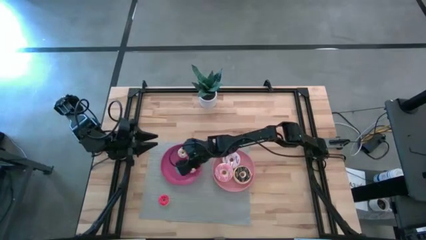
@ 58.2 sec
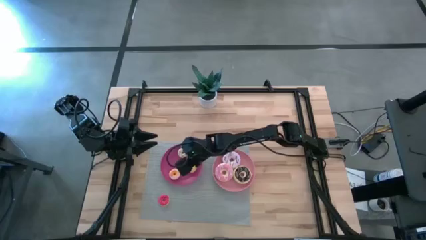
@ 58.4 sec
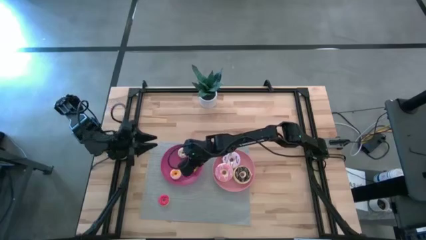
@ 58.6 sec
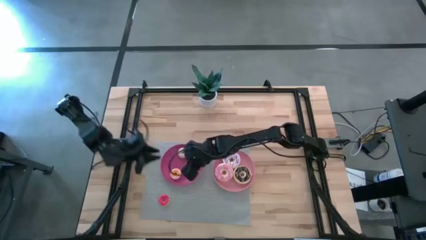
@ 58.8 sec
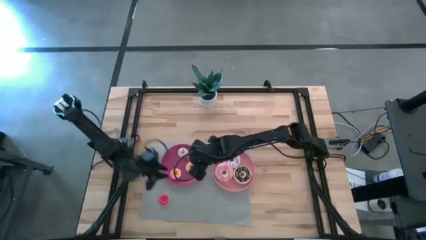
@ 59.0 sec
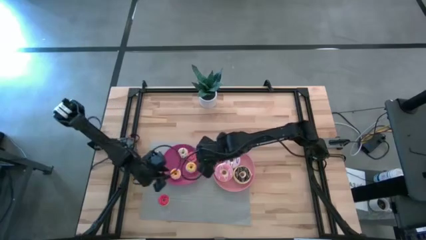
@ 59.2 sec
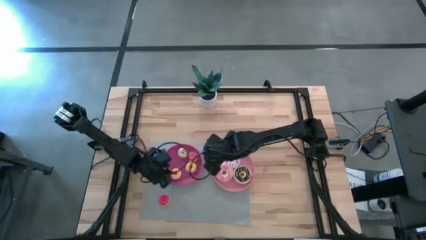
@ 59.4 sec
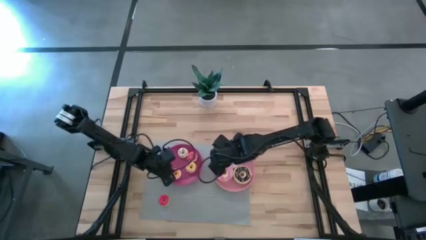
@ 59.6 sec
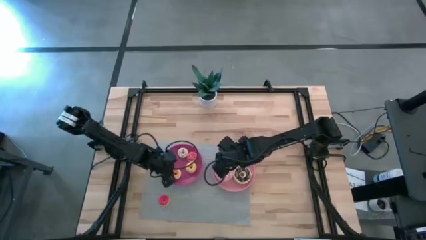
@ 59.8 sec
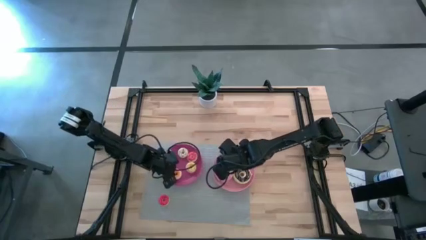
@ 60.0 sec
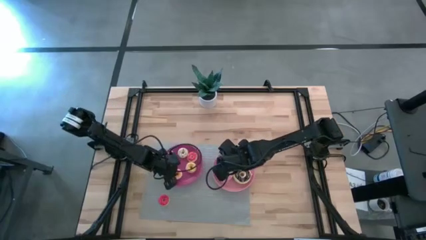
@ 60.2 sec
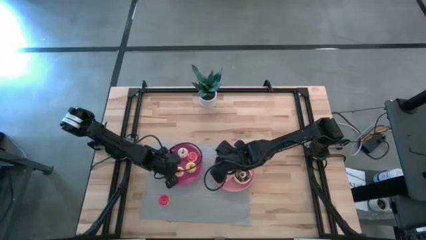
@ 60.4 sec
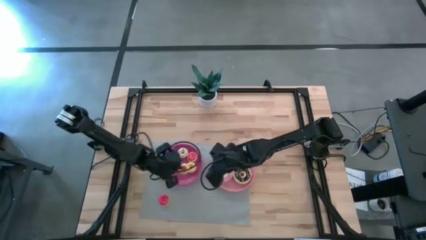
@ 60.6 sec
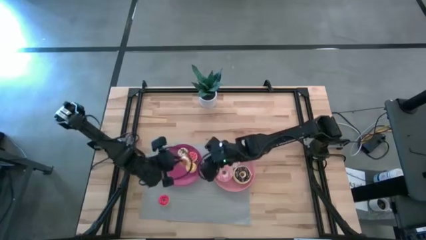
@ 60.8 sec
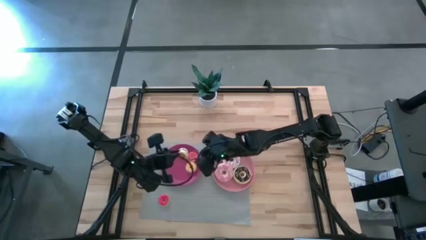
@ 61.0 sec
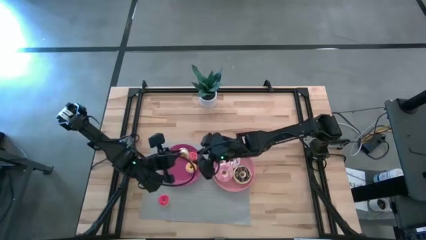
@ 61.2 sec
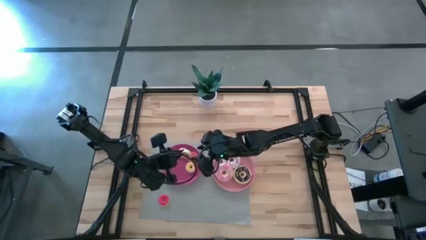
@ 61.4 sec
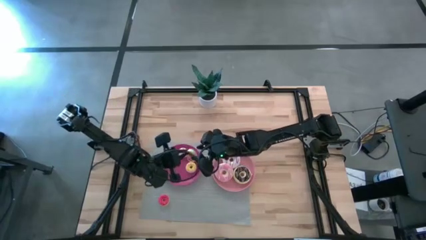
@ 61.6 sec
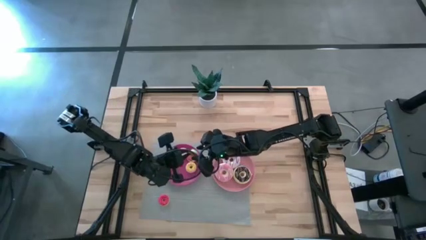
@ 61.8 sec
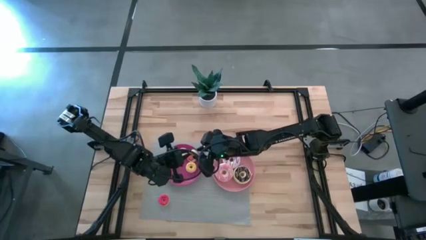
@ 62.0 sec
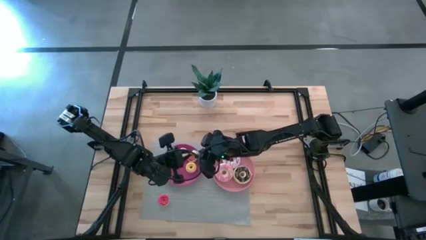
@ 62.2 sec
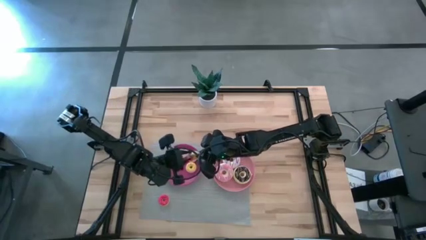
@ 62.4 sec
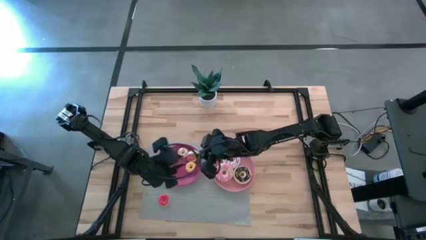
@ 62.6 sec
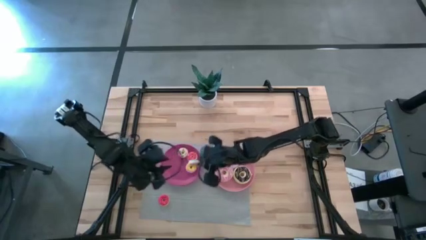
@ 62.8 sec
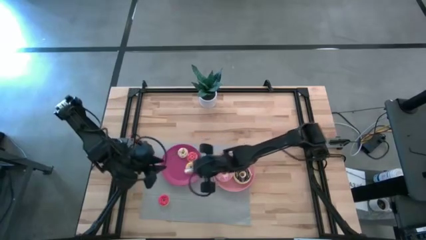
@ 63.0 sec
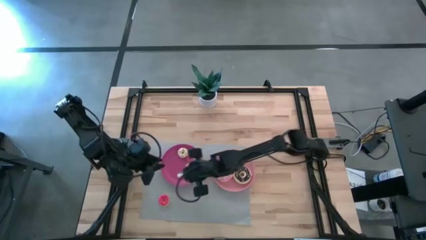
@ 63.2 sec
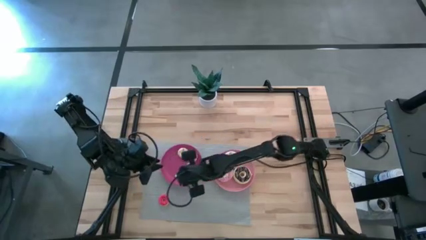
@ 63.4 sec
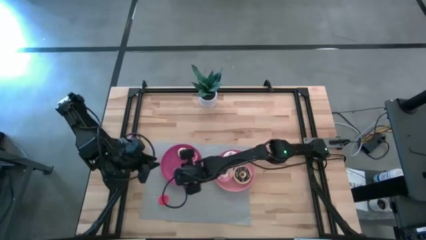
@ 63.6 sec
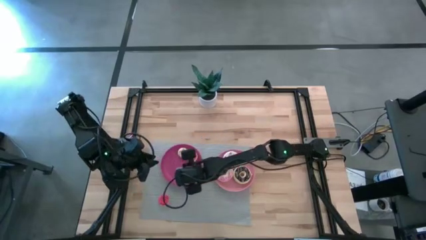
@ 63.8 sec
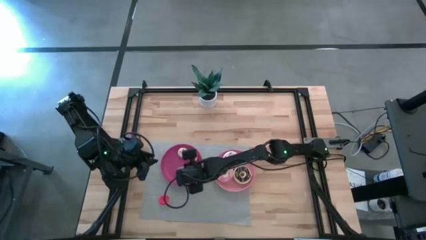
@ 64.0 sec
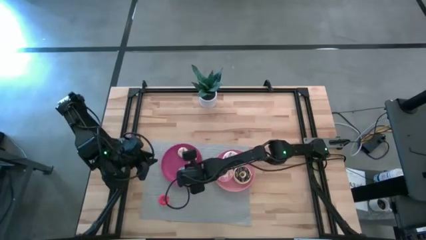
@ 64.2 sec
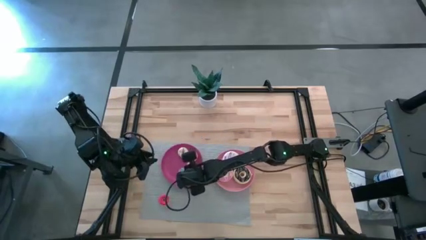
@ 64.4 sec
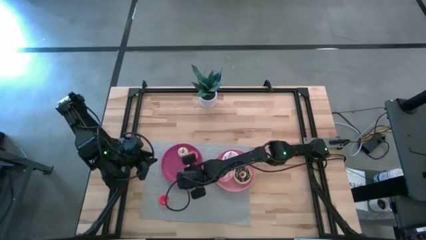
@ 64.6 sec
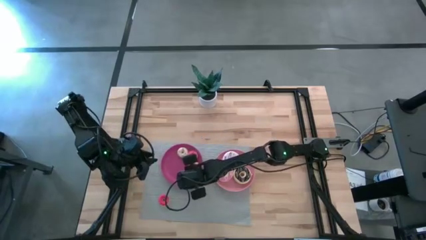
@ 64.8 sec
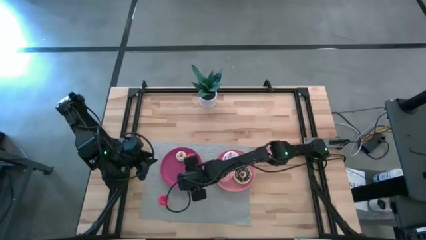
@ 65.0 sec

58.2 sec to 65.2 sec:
Task: Pick & Place donuts
Put the small blue donut on the dark pink plate

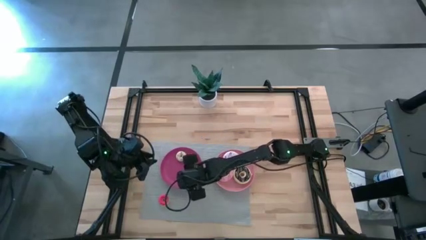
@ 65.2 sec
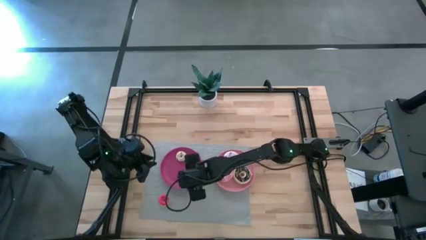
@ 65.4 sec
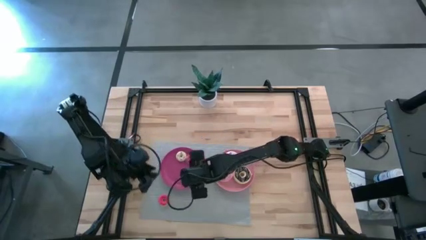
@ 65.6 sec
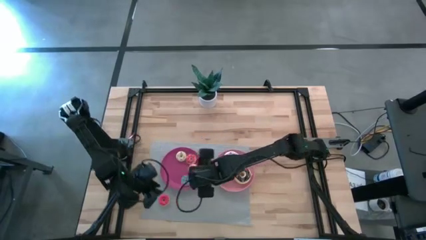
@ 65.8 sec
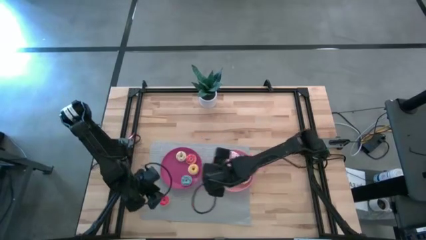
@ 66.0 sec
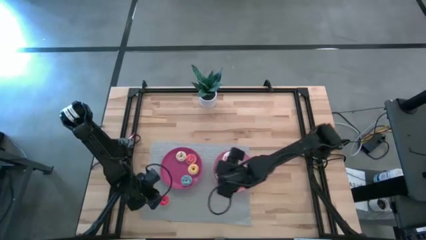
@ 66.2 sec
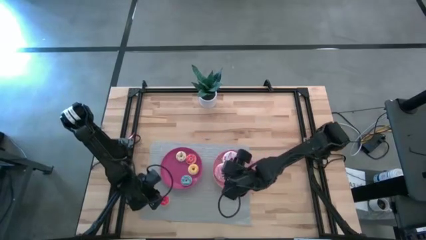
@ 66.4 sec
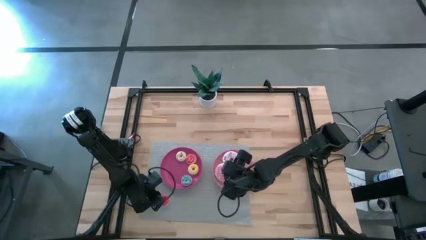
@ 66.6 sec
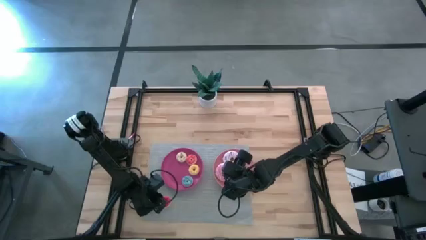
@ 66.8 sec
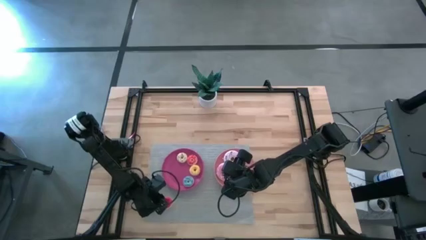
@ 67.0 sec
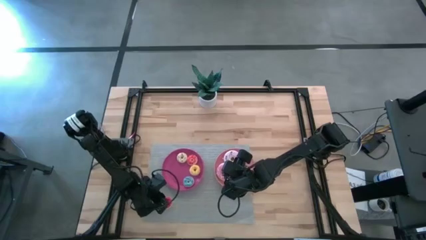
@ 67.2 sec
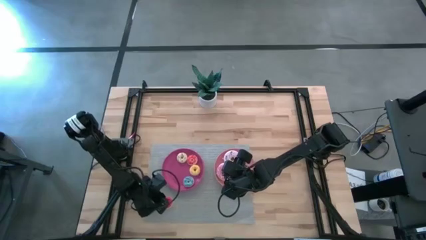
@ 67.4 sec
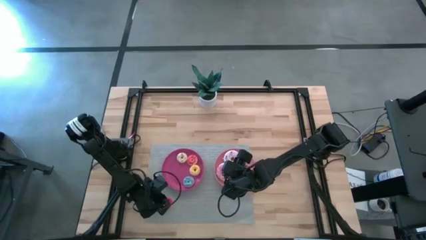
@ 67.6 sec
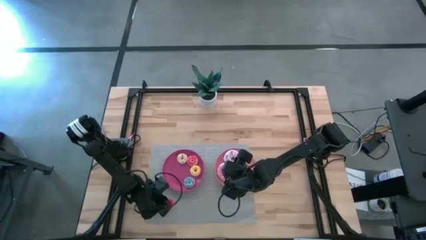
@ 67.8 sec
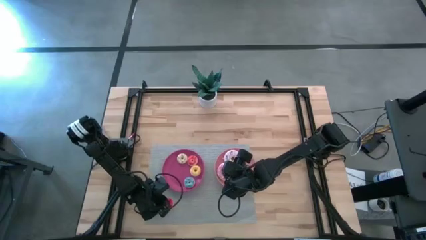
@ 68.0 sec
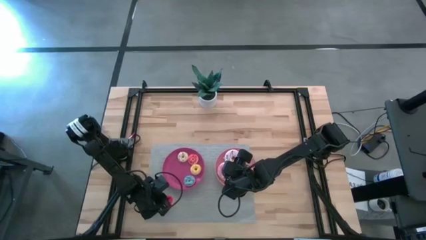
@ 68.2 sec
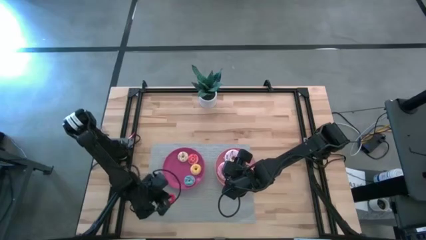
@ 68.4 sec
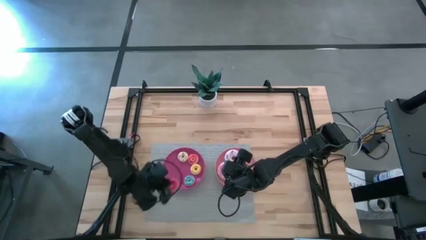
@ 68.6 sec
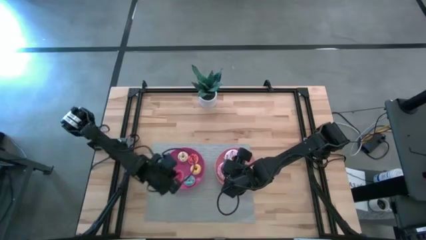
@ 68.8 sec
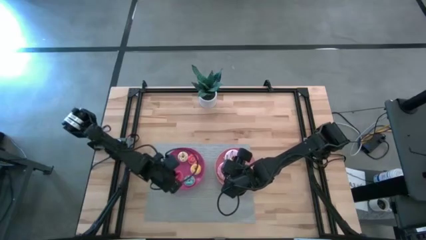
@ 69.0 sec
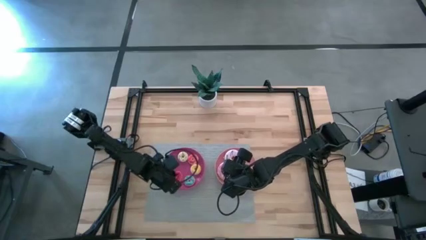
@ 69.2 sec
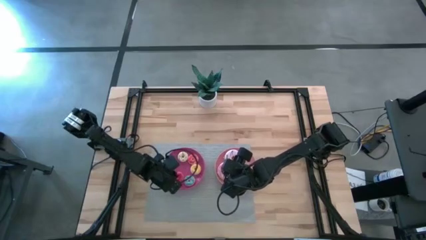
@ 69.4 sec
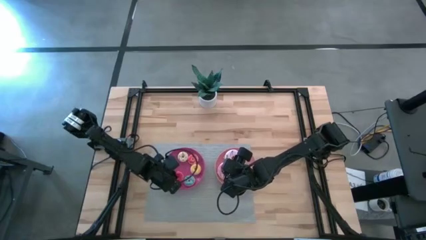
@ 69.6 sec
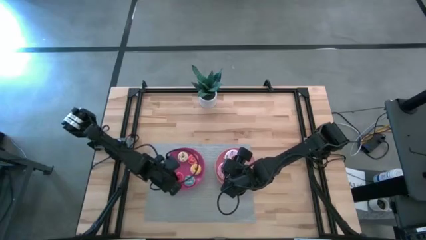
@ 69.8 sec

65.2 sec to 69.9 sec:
Put the small red donut on the dark pink plate

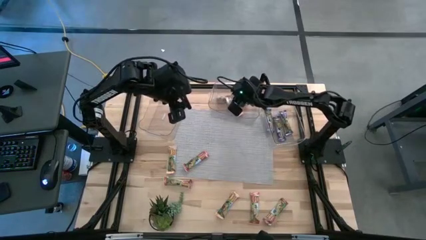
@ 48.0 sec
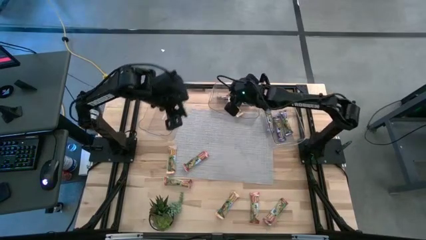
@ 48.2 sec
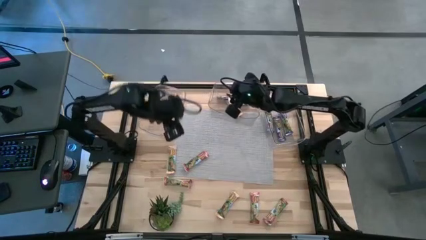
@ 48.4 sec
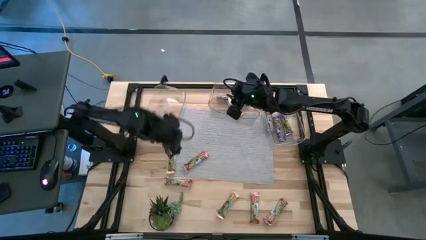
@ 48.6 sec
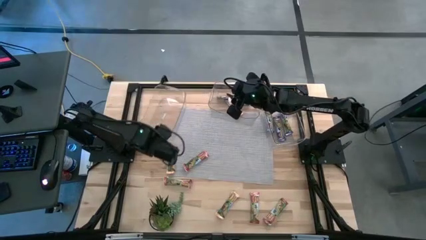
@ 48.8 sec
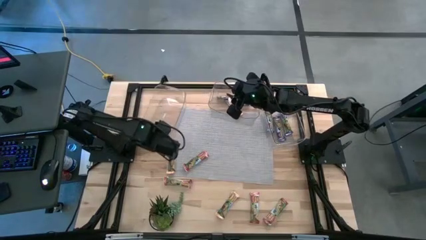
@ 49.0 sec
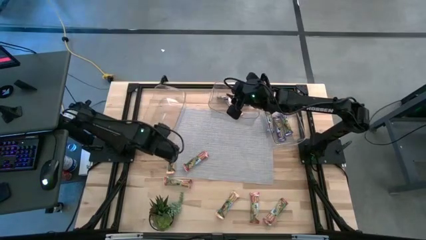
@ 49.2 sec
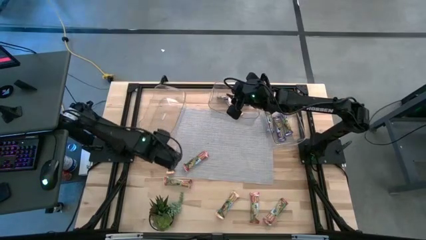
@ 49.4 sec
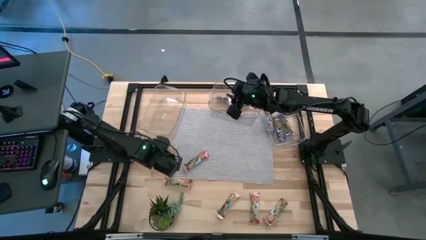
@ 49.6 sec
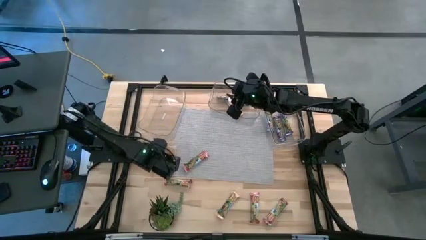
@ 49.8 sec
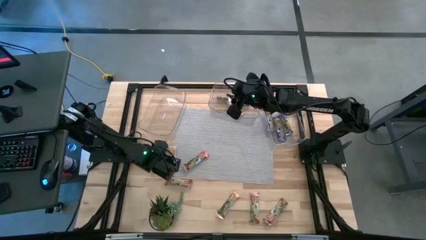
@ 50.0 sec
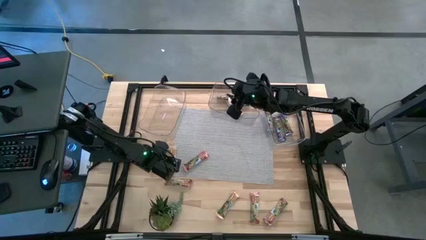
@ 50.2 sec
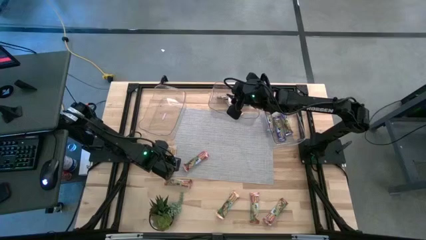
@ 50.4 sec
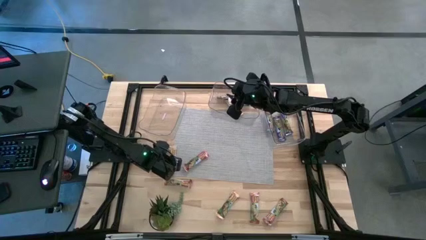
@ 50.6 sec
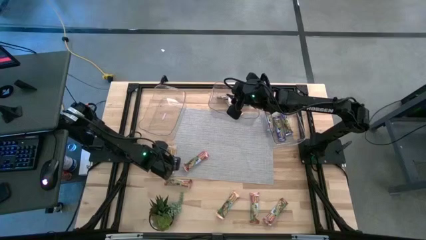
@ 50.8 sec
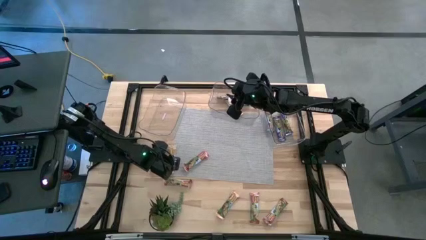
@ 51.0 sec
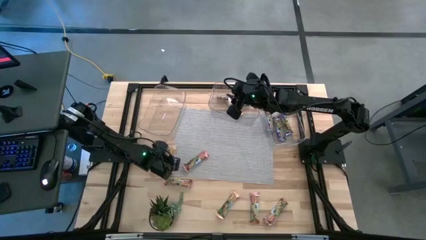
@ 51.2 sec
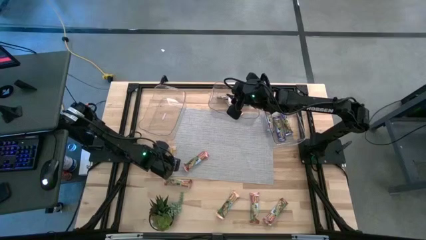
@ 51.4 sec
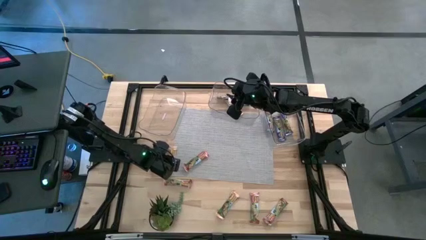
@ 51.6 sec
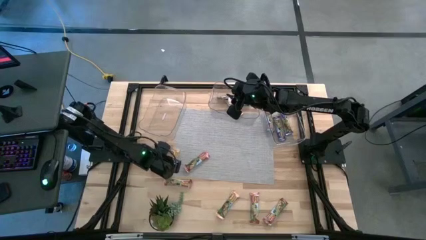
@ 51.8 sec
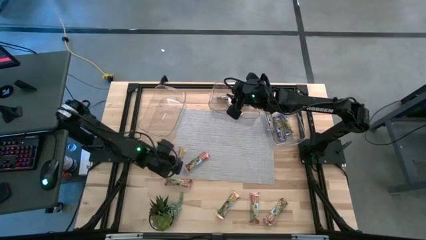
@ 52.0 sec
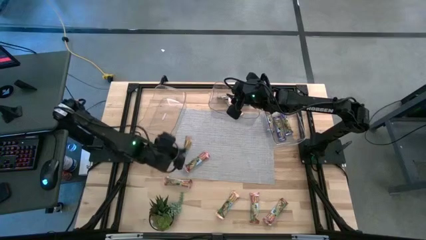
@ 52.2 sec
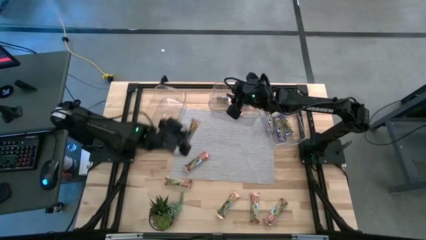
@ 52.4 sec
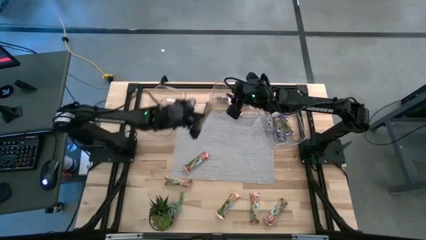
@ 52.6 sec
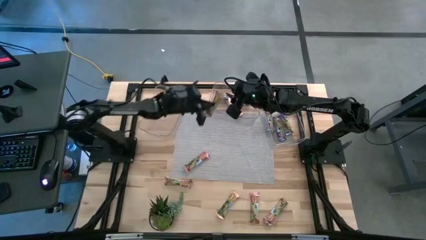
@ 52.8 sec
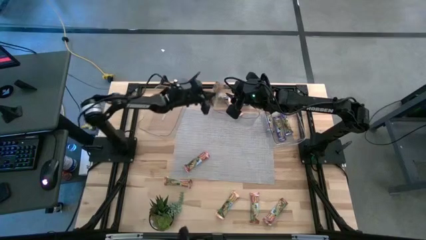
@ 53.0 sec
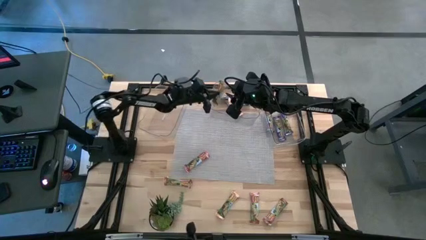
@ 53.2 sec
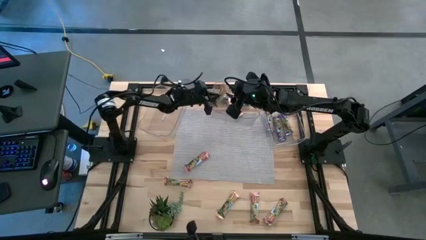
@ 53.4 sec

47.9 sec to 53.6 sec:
Task: Pick and place Granola Bars by type
Put the yellow granola bar into the middle transparent bin
